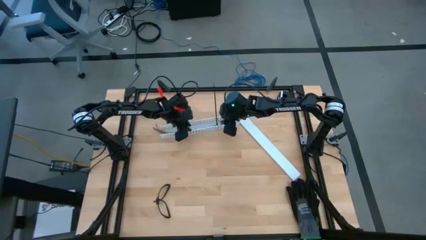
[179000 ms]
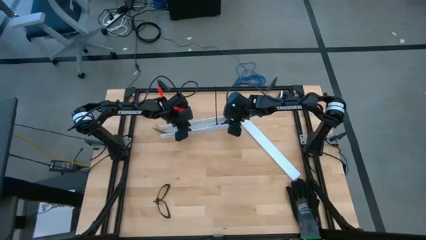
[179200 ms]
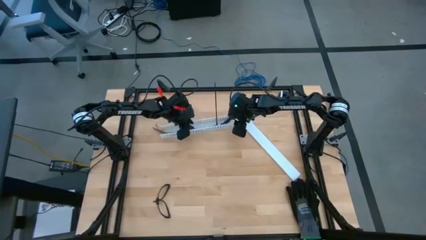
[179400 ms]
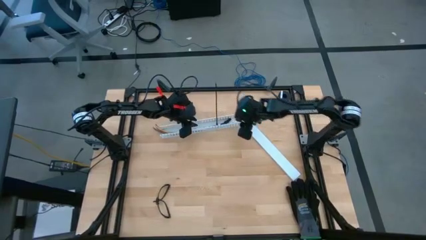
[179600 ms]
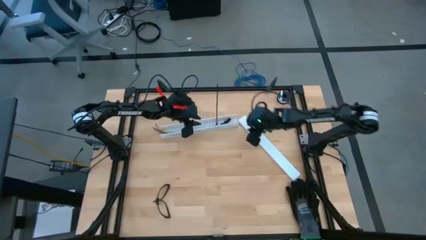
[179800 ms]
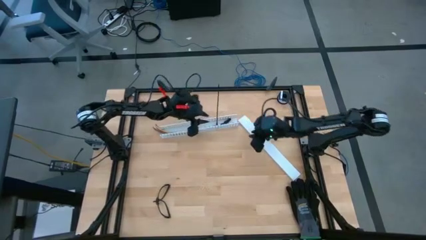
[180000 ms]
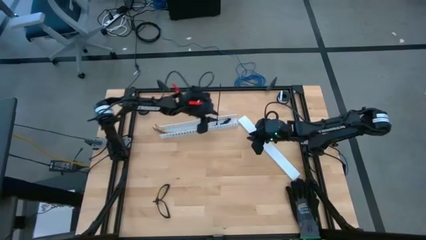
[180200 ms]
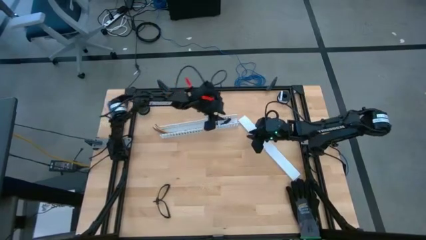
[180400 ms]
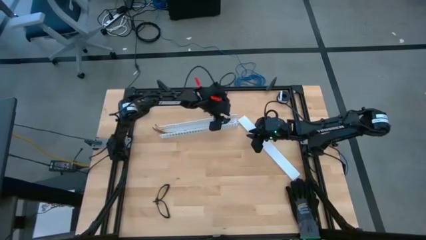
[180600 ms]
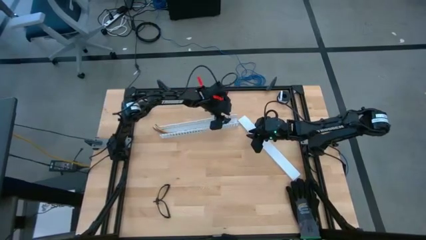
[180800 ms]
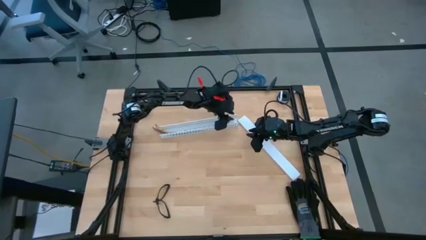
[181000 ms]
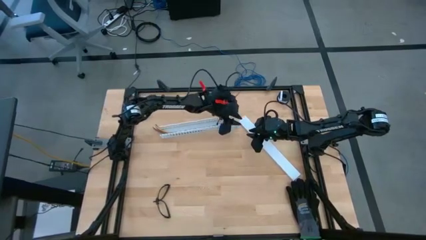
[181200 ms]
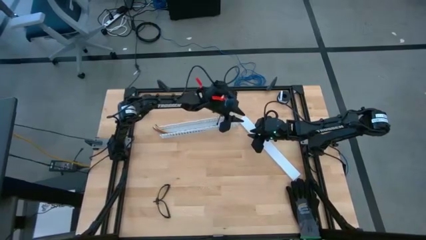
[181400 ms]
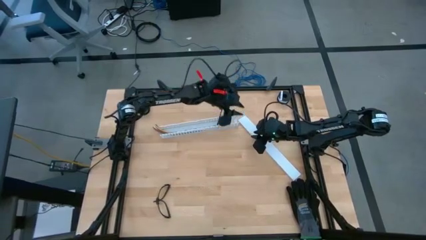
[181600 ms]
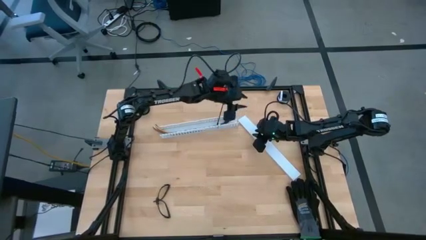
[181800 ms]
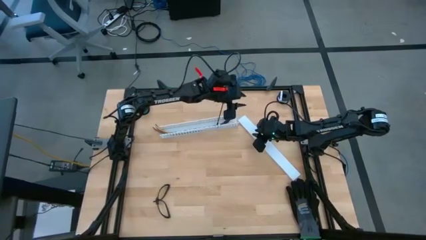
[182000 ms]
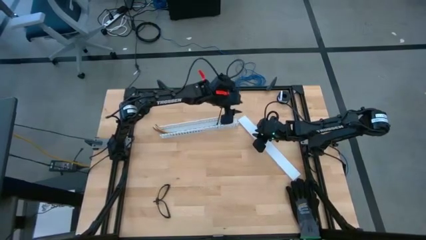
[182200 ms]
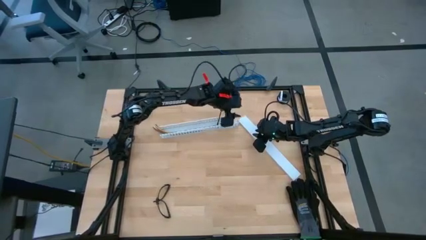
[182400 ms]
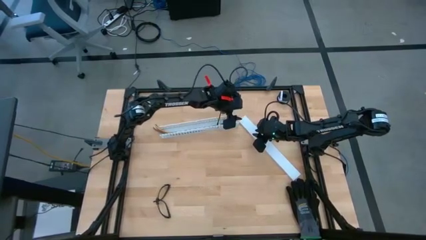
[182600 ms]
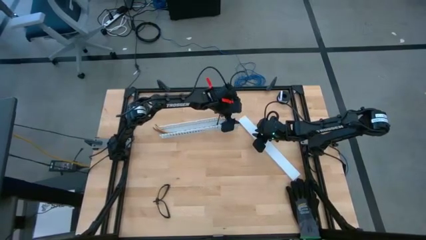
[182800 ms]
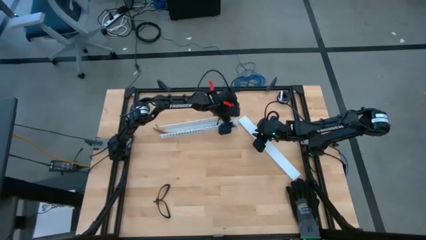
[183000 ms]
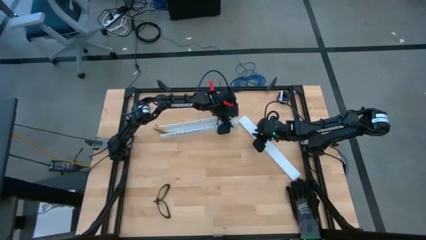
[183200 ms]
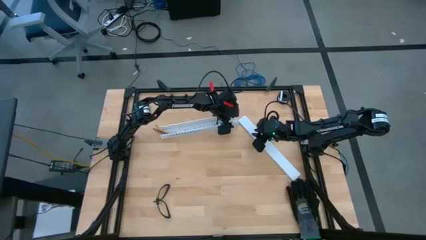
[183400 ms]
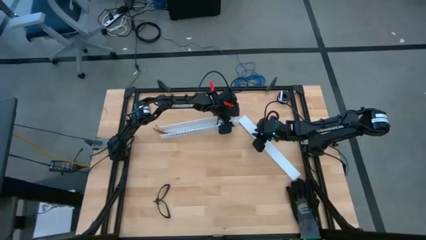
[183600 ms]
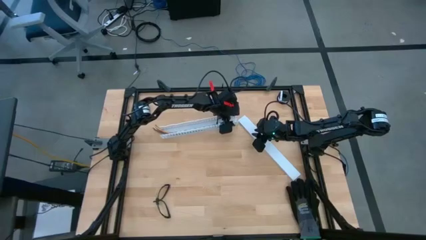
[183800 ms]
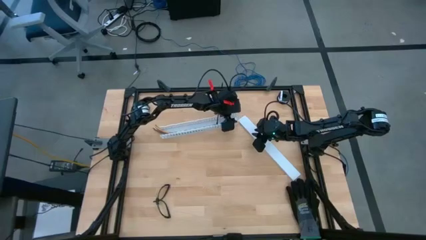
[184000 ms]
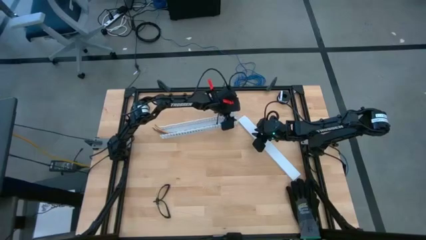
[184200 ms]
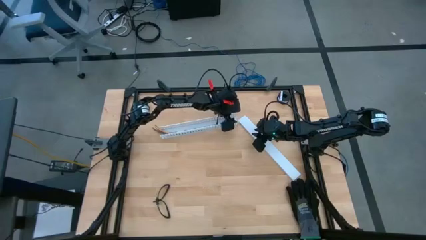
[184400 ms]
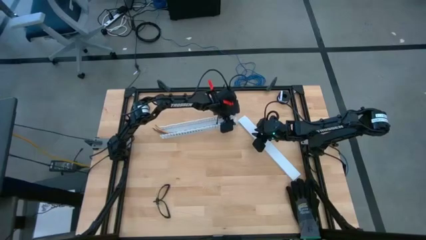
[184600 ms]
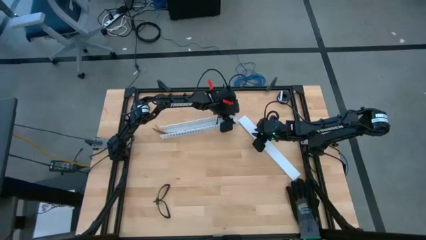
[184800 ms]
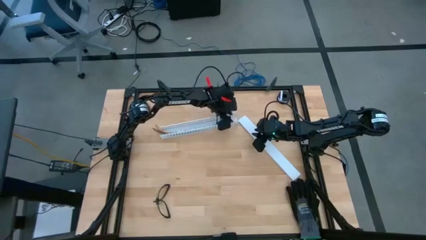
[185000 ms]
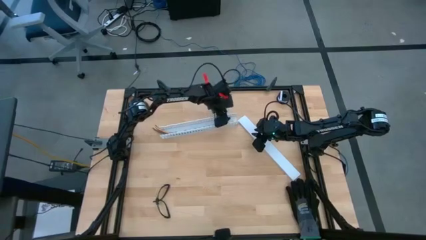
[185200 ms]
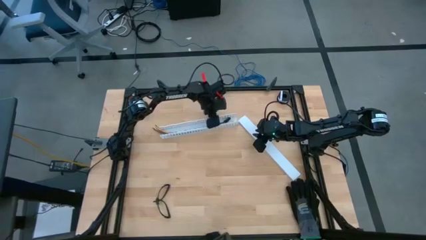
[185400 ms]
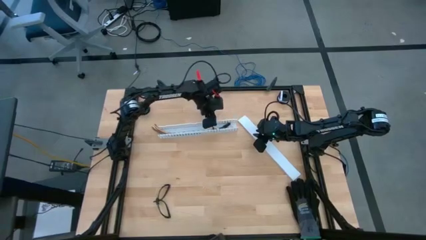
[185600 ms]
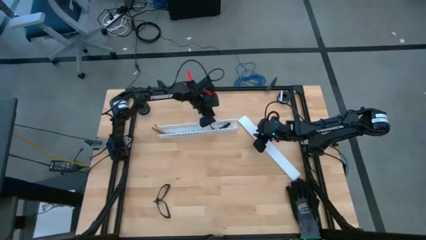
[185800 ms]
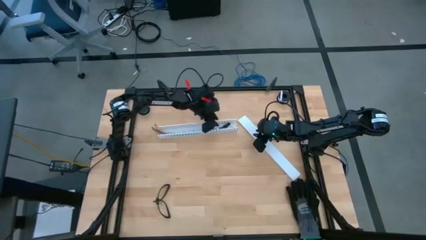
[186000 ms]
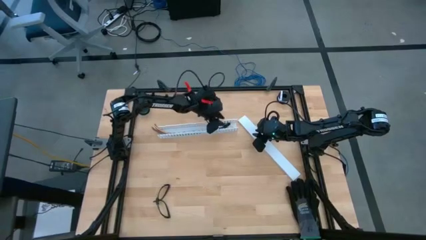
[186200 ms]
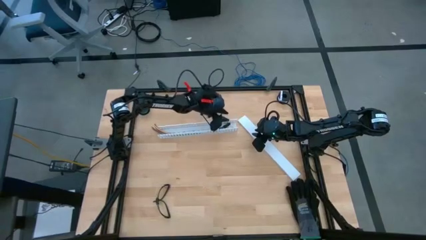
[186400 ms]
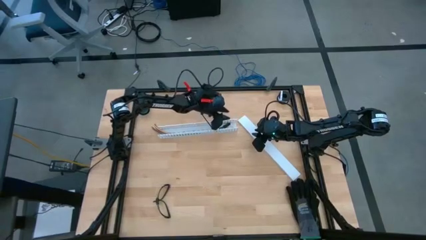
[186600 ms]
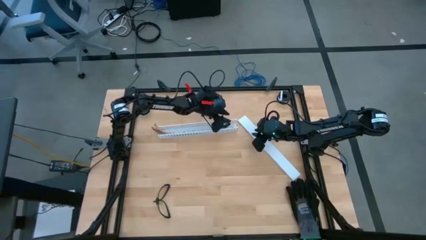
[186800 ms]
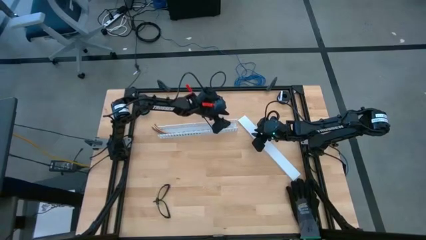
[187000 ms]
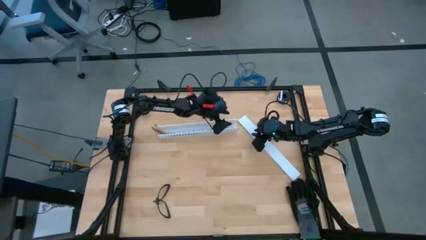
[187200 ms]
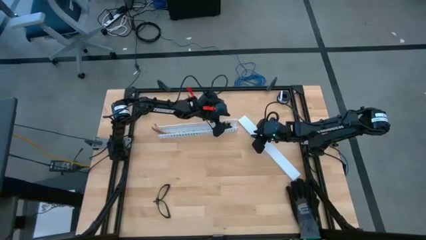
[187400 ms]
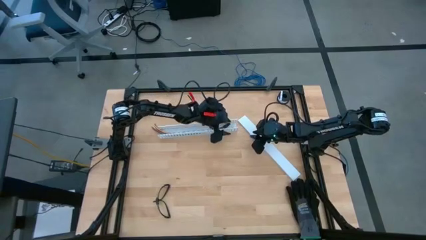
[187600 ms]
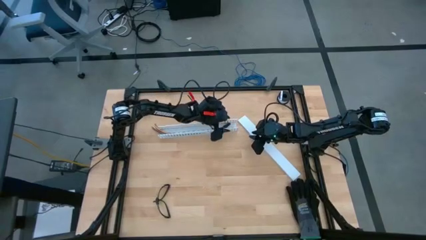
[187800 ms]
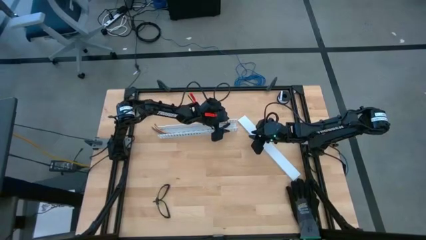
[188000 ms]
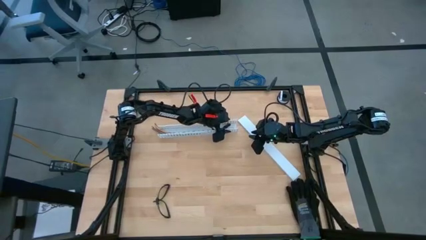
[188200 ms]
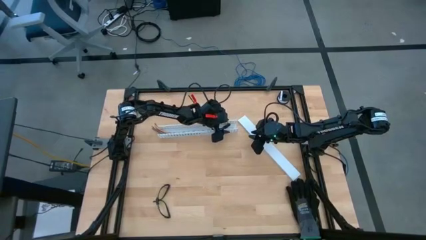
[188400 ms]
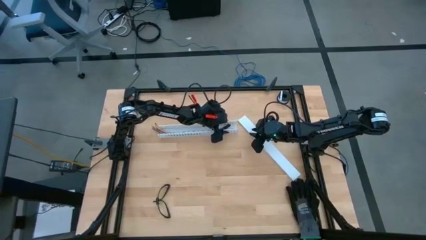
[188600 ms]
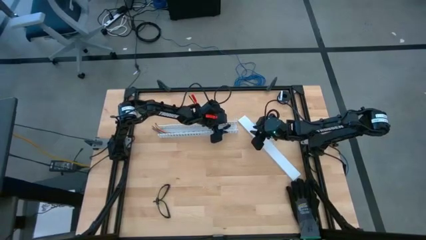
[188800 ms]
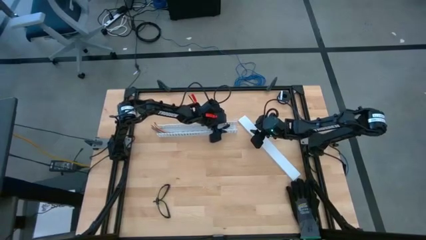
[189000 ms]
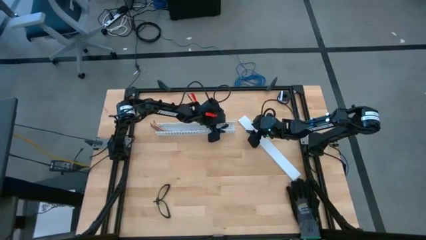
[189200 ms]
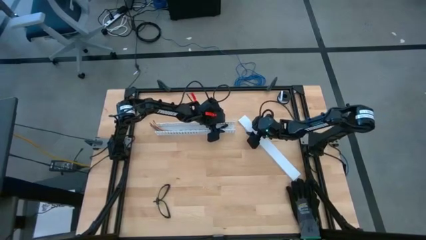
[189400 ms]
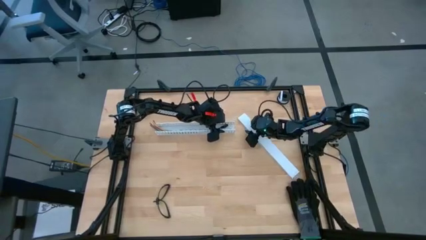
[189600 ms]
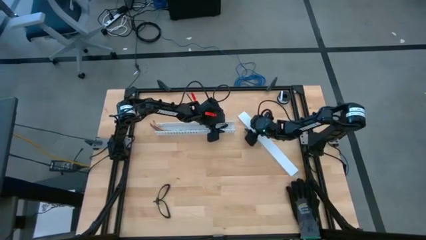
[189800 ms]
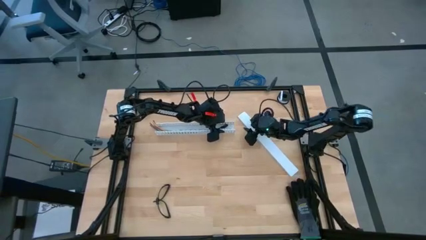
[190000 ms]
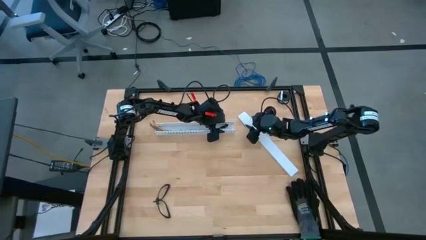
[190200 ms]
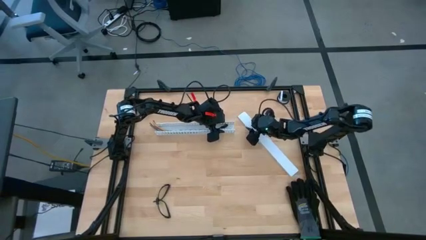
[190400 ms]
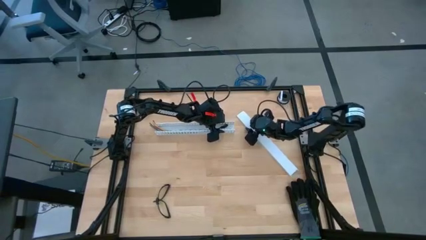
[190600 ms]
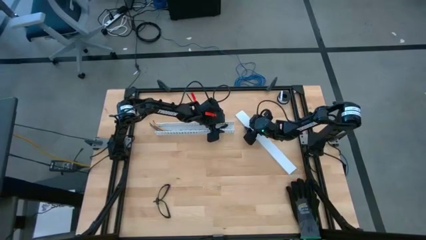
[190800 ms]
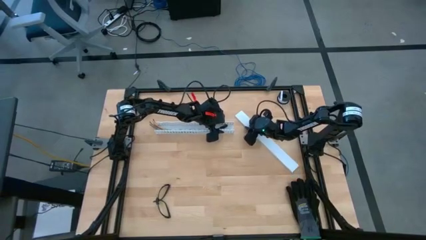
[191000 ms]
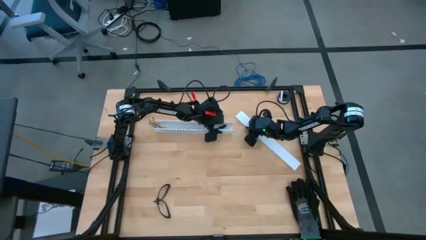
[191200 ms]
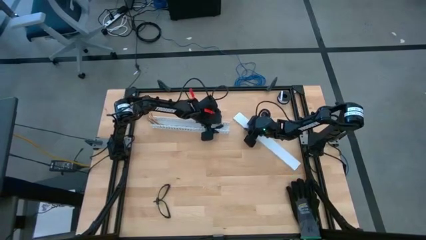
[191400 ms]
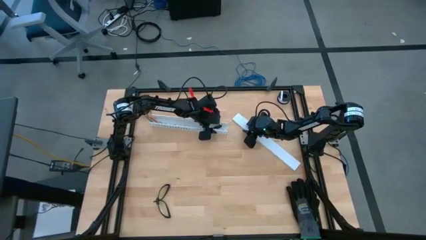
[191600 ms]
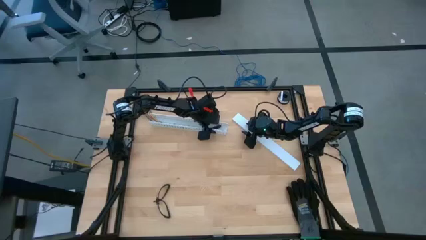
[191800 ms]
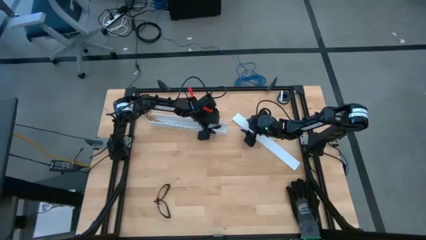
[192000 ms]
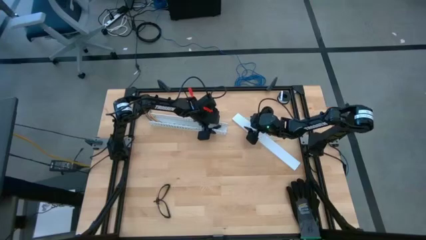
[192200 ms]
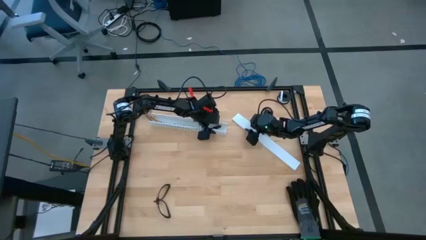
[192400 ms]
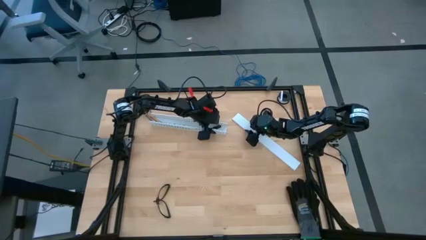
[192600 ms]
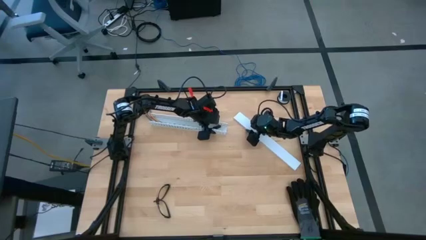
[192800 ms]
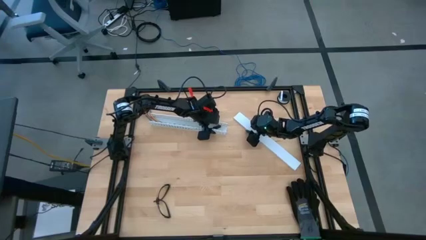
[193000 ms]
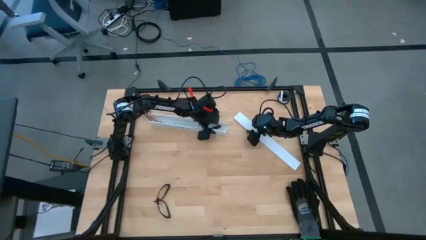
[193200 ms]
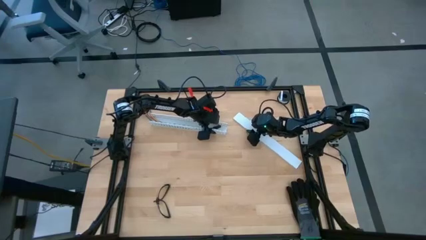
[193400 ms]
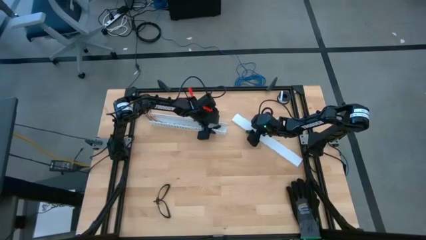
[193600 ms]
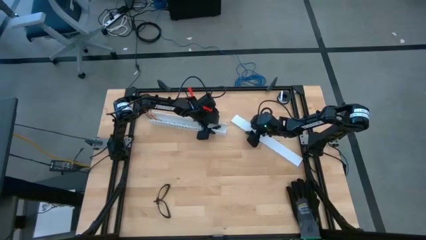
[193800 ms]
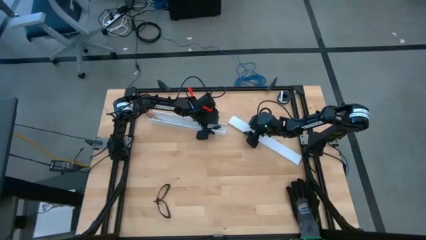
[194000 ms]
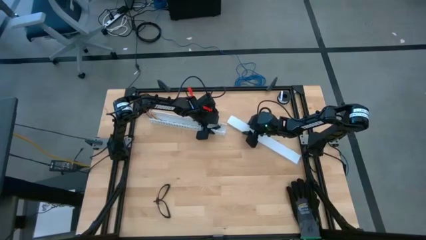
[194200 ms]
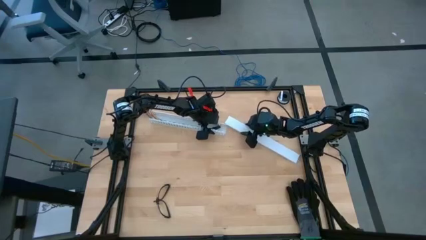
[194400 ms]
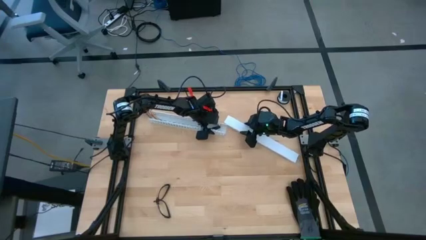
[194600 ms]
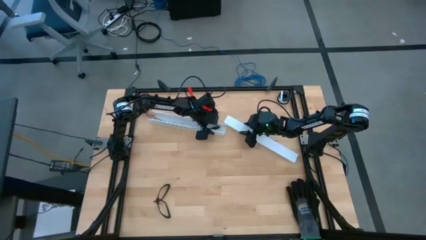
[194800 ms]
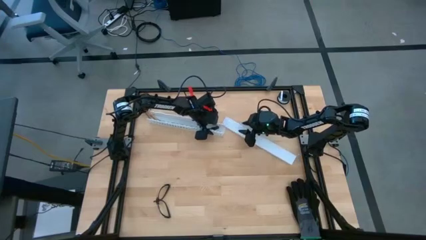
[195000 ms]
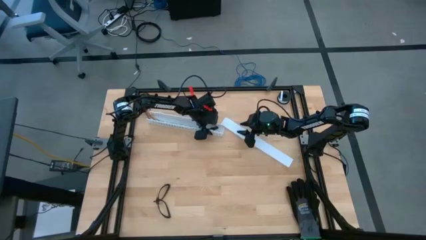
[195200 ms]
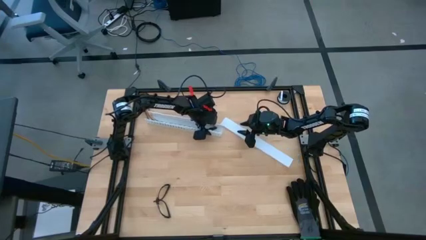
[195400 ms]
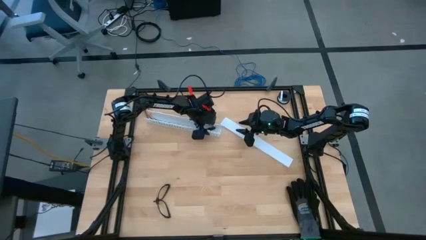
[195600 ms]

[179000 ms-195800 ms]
Task: Ziptie cables
Close the white cable duct lid
